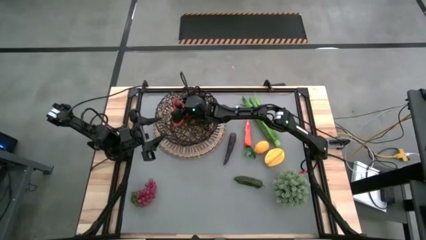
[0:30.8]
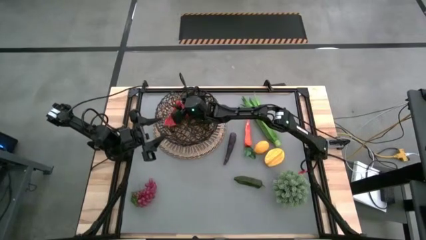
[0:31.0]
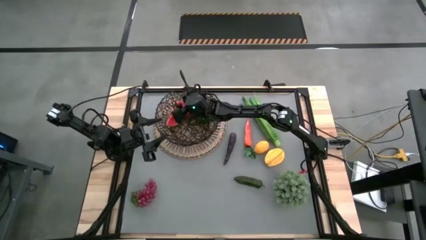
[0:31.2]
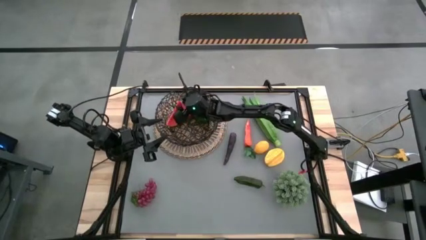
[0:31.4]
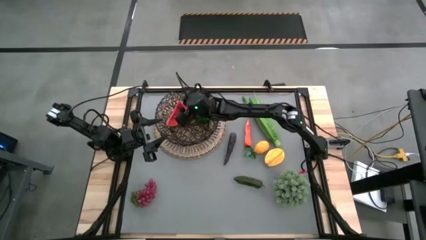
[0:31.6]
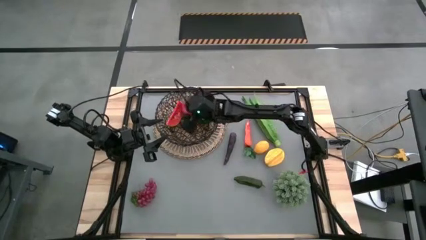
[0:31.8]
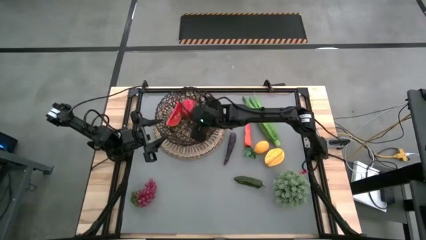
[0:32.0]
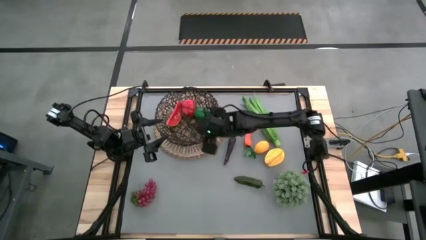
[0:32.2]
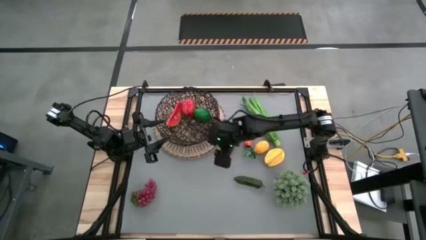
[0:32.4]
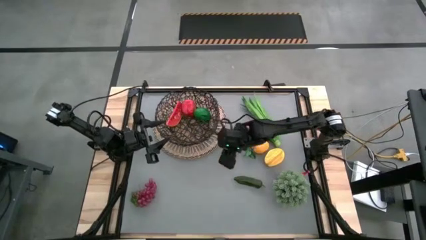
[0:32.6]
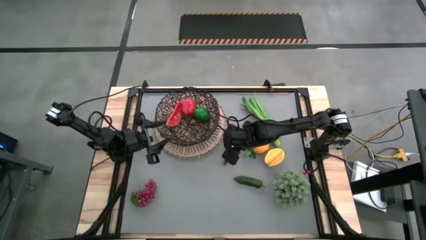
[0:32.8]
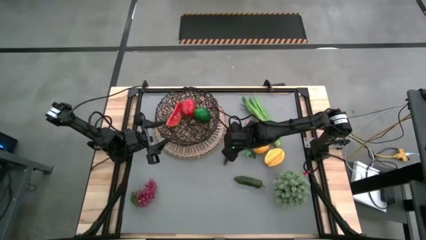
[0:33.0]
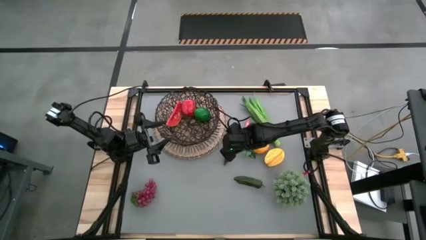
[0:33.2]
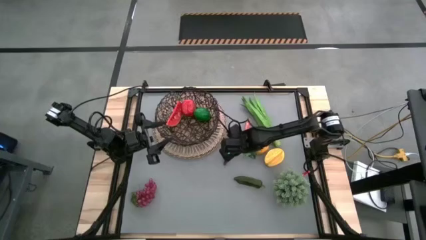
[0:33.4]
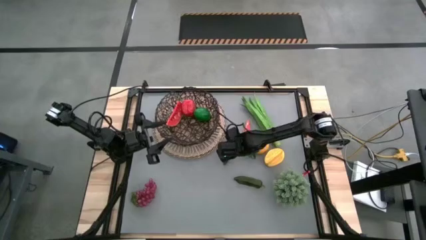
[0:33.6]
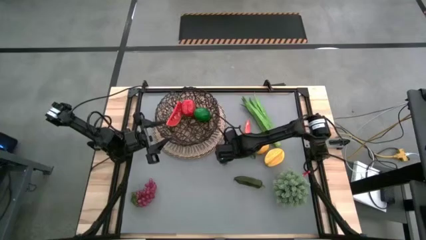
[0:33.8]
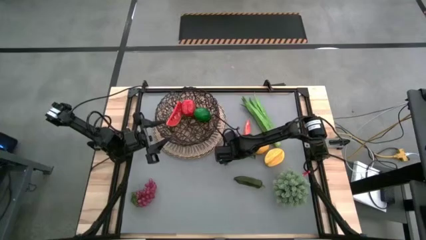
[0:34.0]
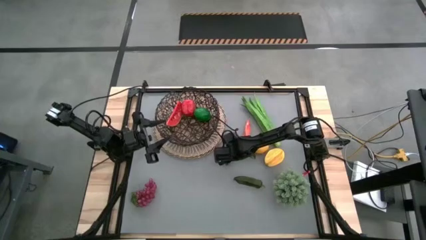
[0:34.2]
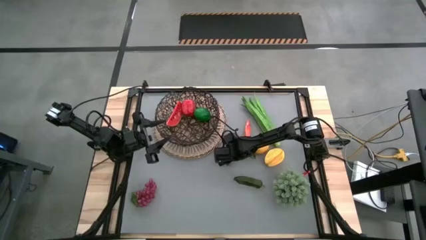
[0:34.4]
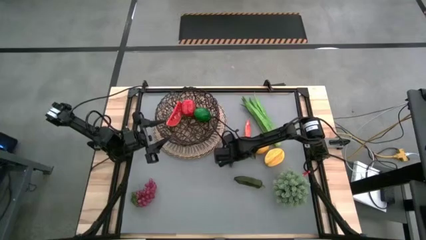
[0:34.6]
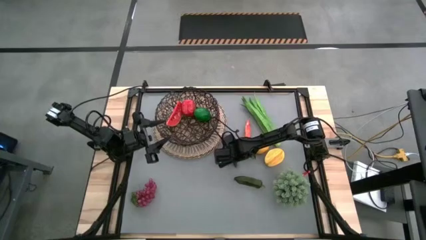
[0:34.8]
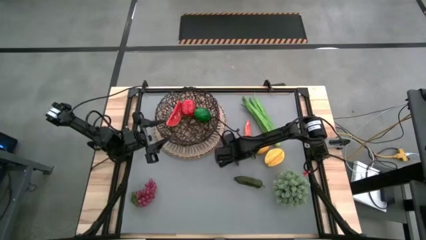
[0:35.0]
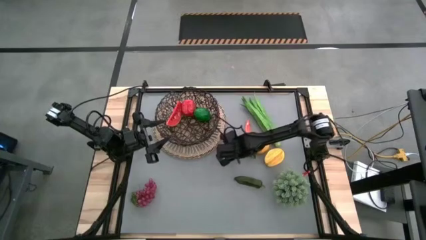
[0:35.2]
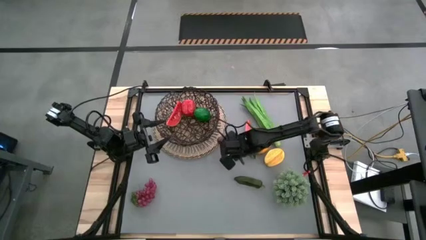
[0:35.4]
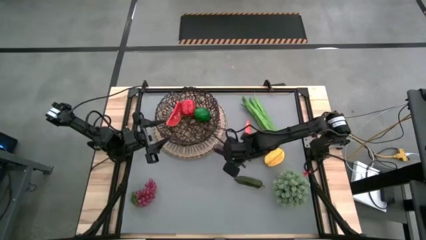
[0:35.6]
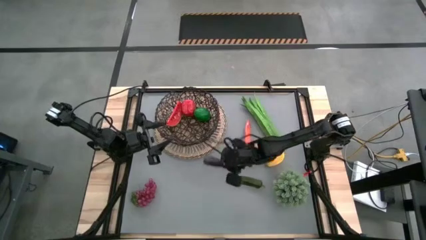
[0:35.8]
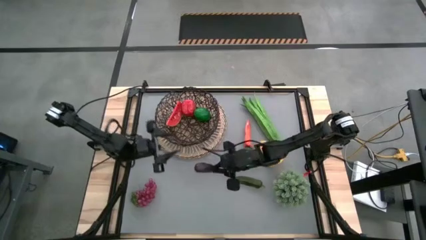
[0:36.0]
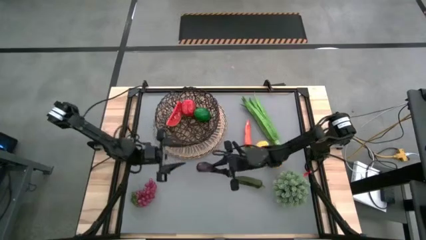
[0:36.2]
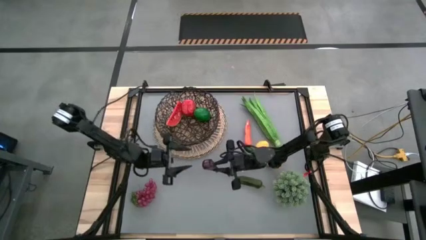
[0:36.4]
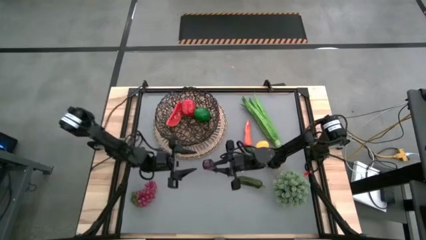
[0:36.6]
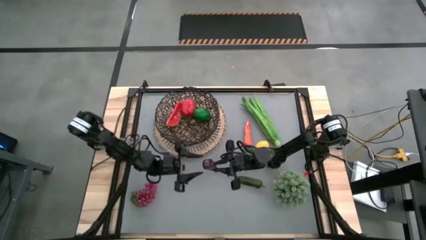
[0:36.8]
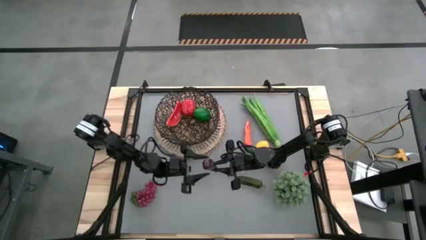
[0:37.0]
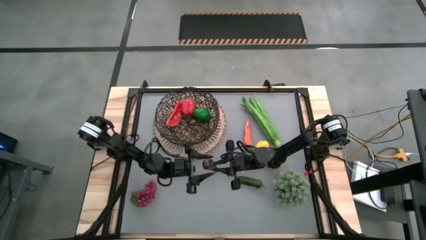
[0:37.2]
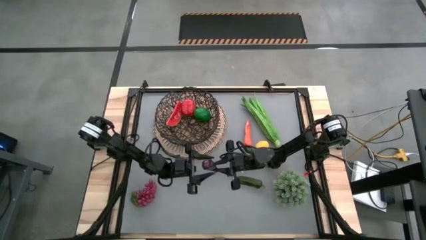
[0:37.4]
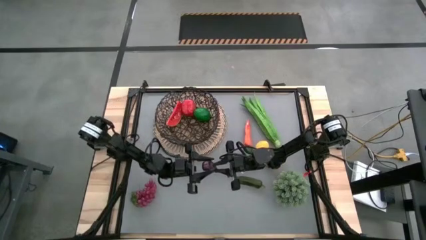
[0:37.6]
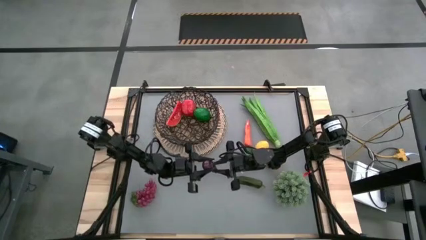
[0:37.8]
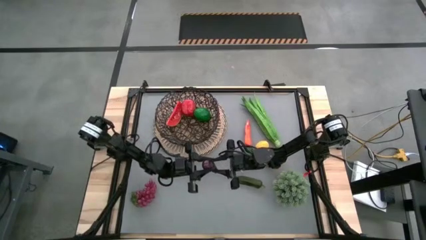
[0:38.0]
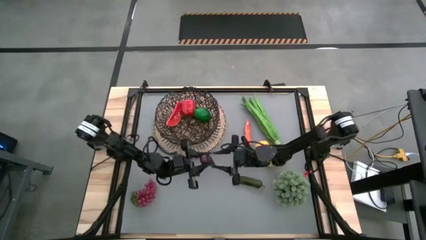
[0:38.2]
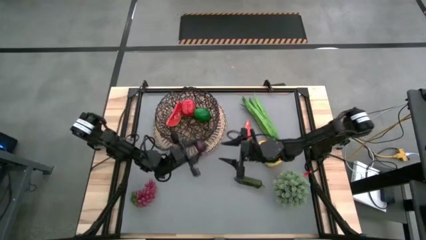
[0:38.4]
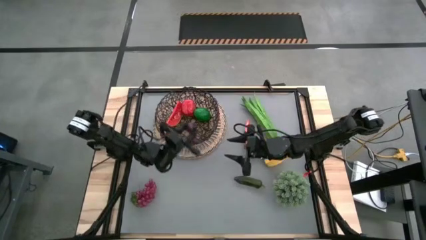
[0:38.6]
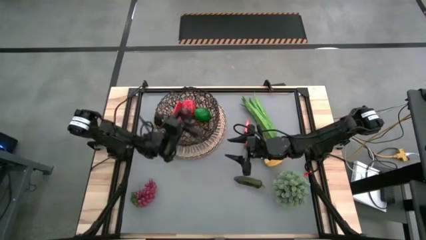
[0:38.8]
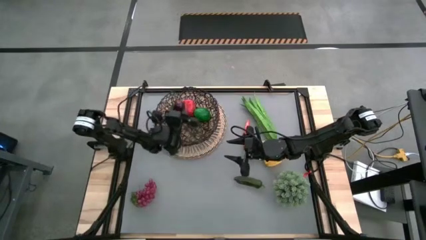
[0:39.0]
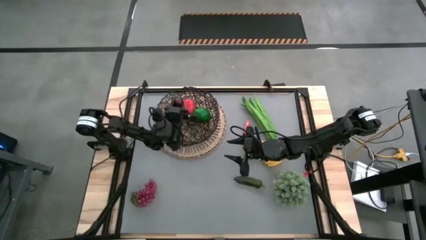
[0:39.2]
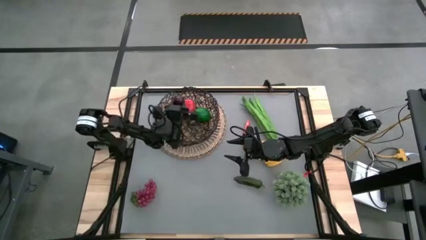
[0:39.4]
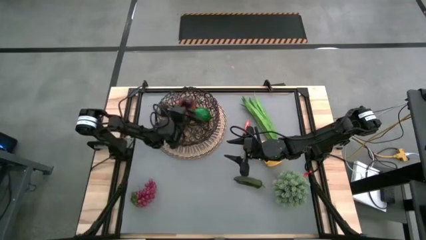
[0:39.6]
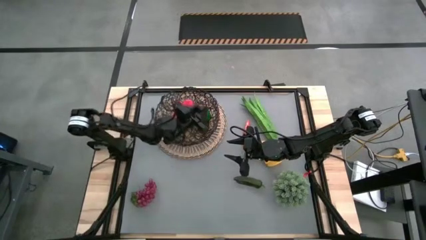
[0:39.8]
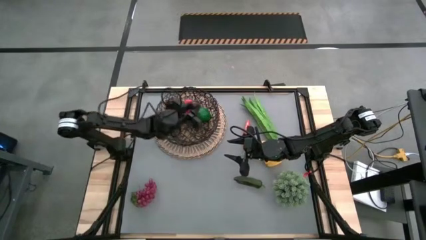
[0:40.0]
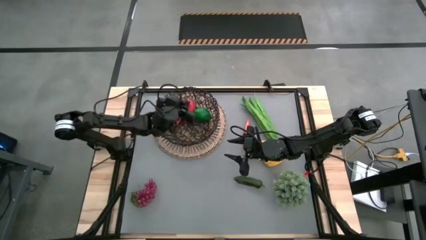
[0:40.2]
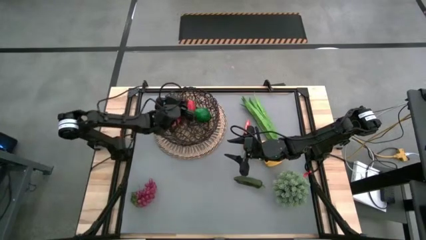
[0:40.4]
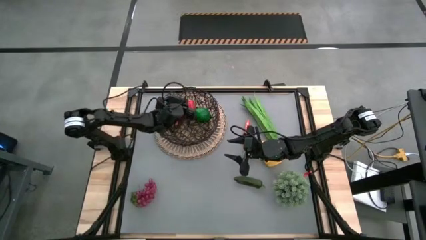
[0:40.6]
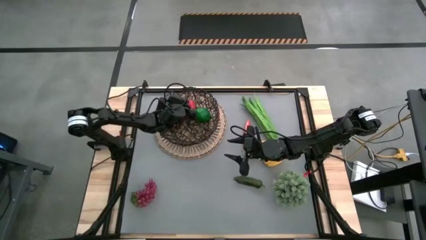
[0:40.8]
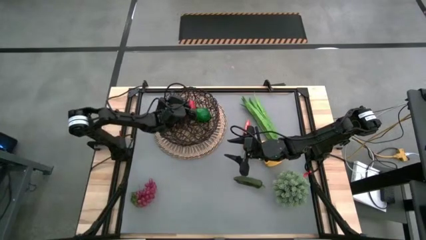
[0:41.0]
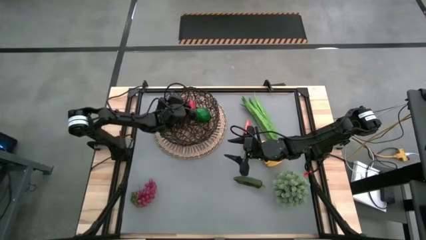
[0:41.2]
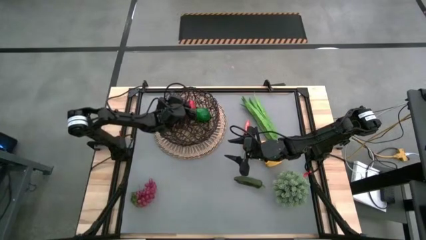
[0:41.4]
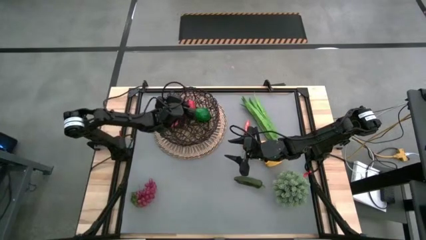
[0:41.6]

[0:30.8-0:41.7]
Task: Build produce basket
Put the violet eggplant into the black wire basket
